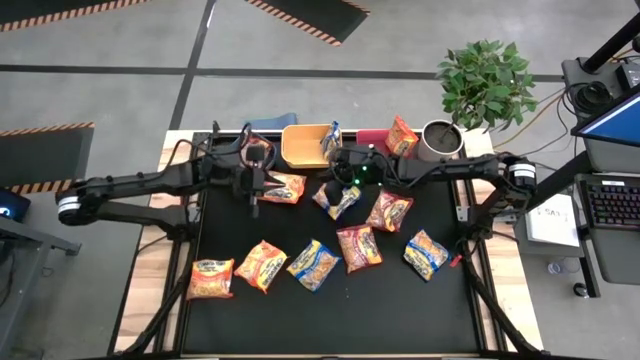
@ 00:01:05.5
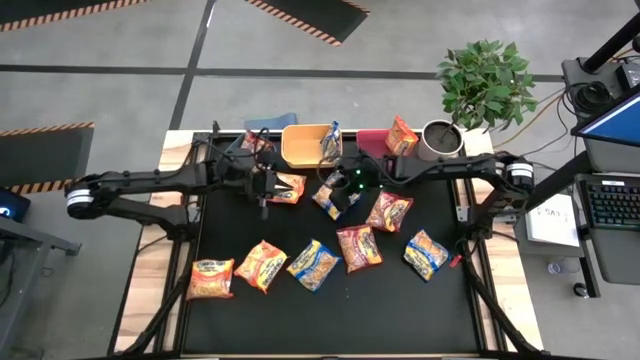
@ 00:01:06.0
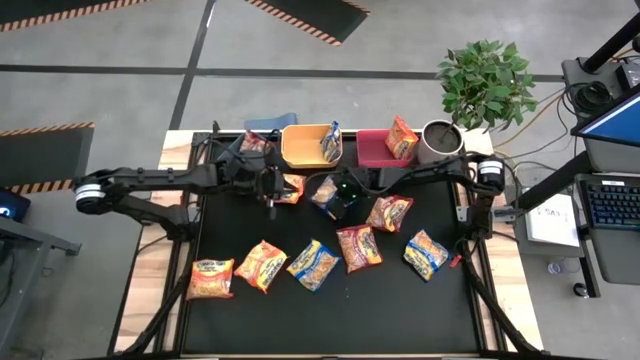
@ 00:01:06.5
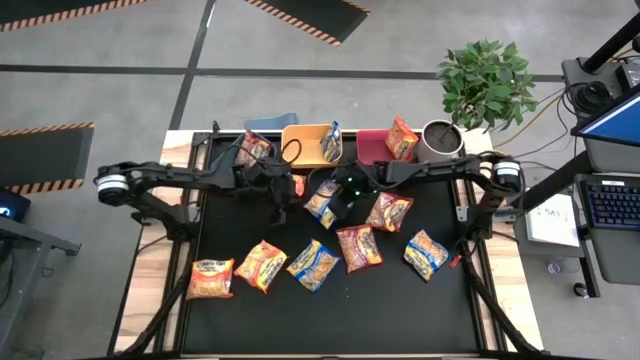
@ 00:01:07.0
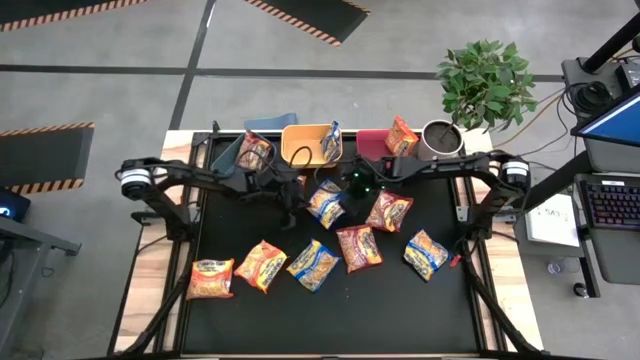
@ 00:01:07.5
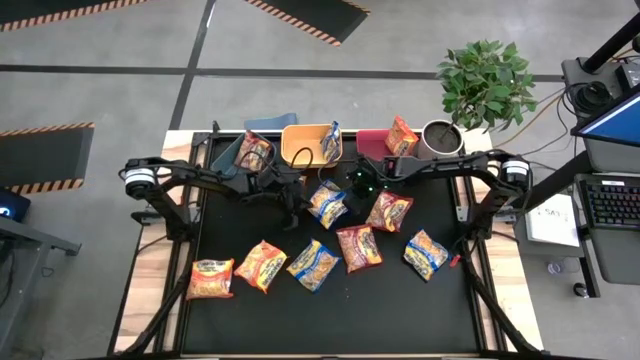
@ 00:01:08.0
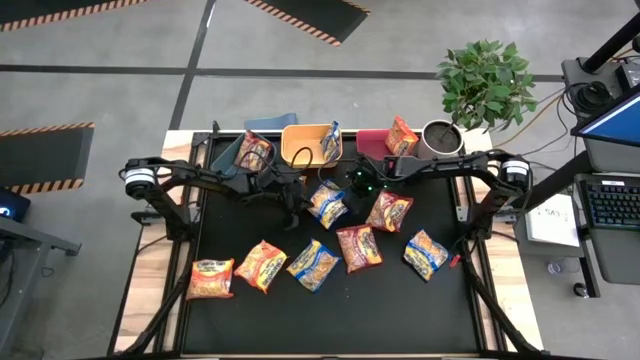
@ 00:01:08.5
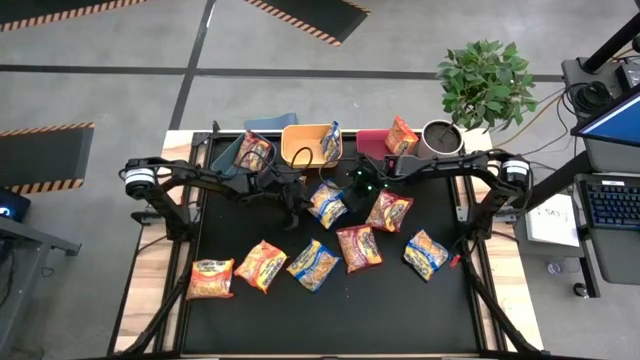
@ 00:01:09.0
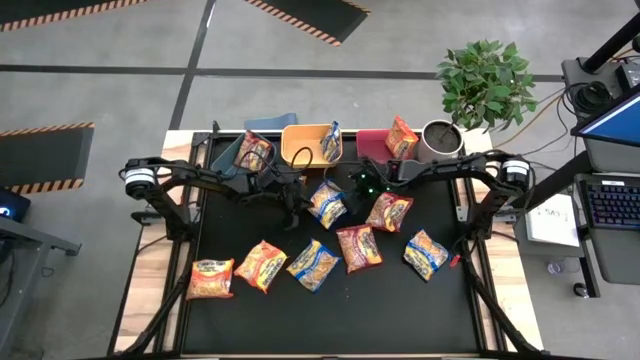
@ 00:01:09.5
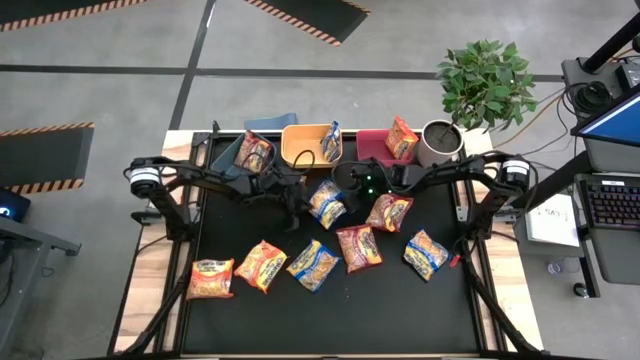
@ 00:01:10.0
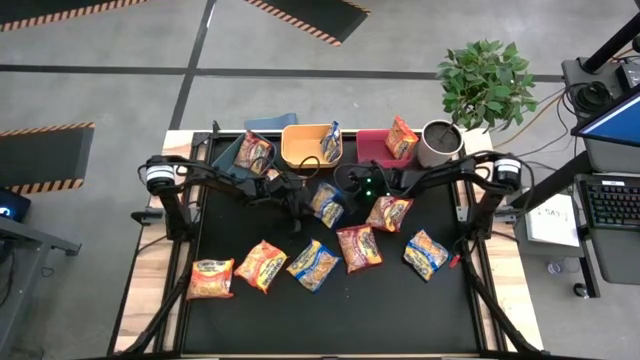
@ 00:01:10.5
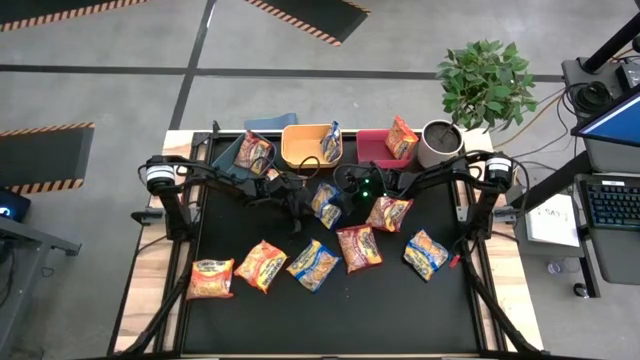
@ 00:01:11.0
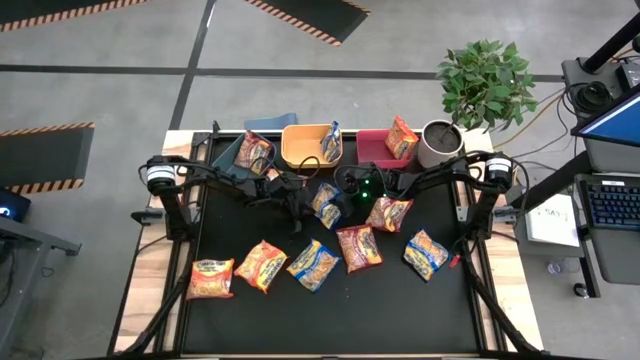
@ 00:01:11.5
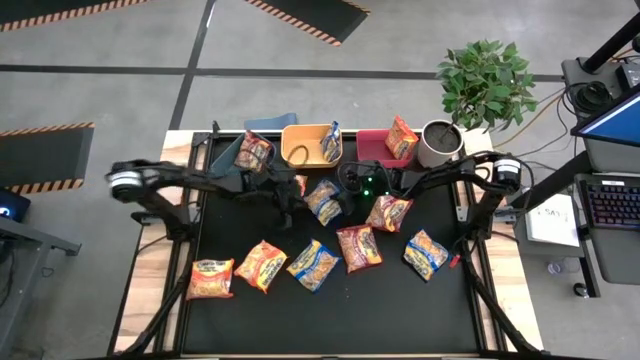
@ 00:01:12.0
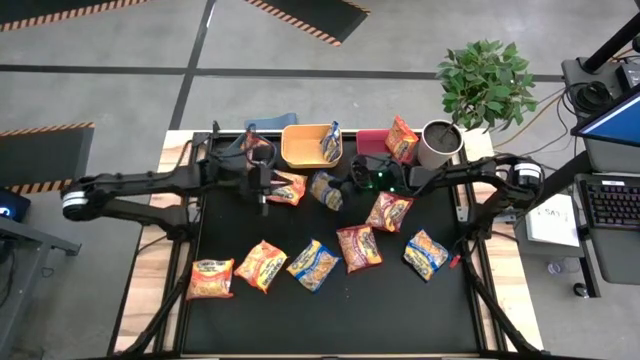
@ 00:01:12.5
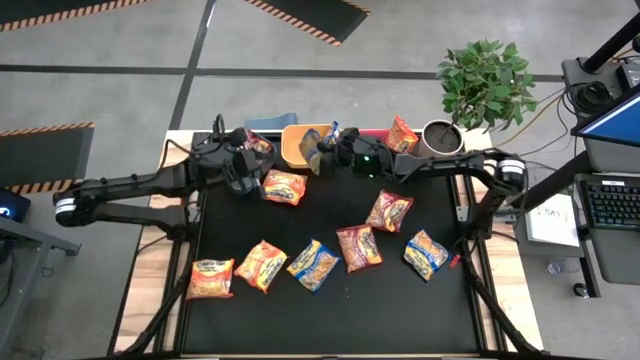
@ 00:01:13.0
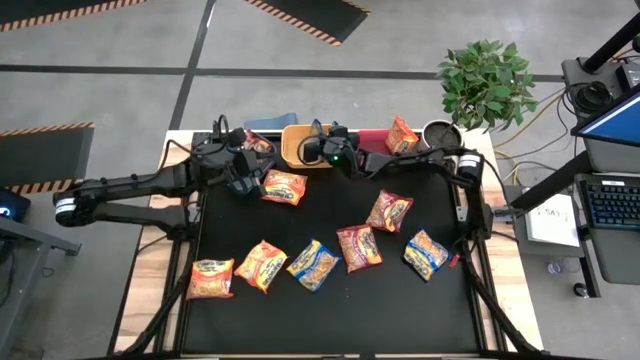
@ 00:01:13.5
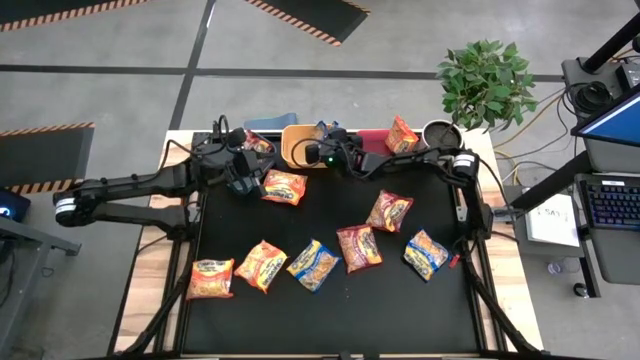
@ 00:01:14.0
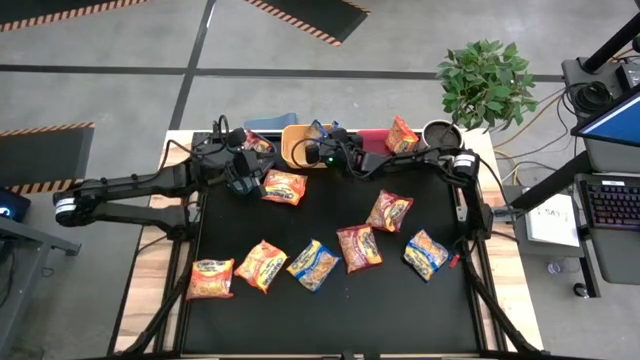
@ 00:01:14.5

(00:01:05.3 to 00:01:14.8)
Task: Sort Maruchan noodles
Put the blue noodle pack into the yellow bin

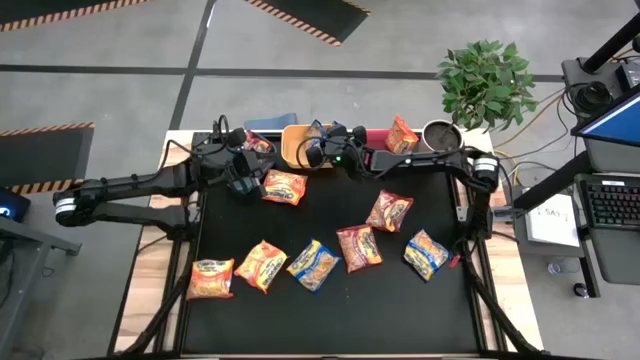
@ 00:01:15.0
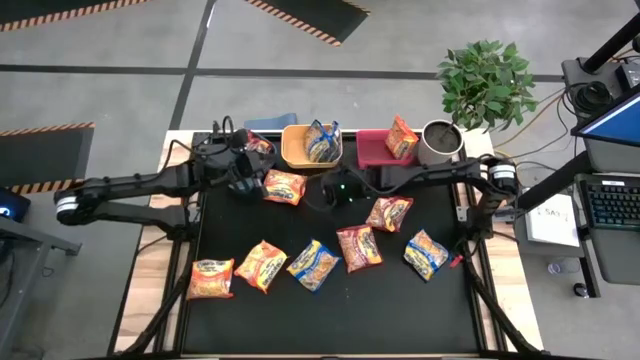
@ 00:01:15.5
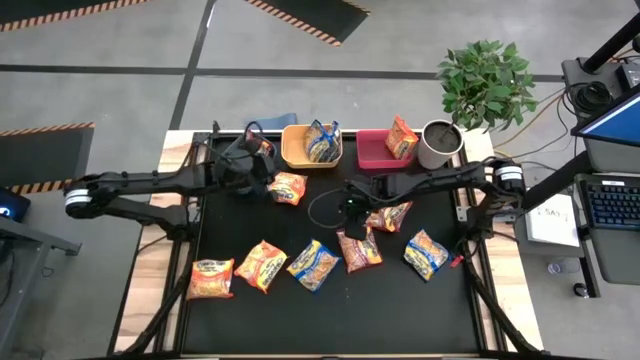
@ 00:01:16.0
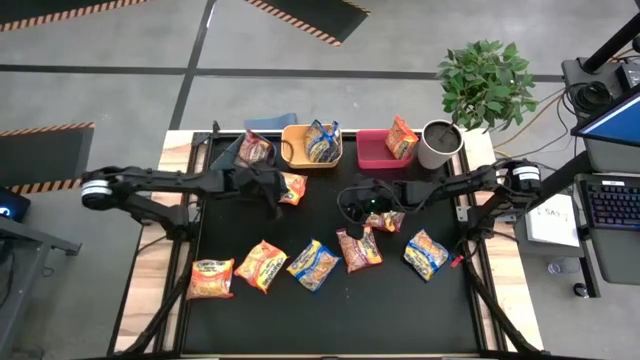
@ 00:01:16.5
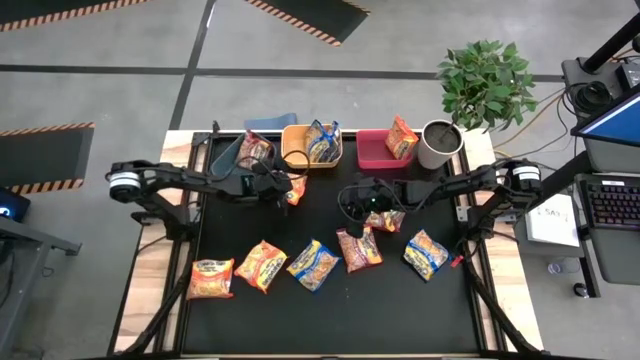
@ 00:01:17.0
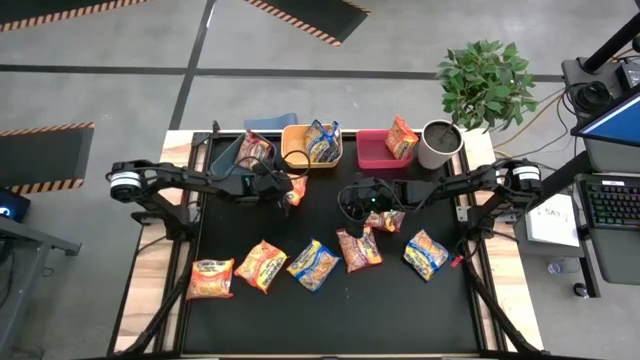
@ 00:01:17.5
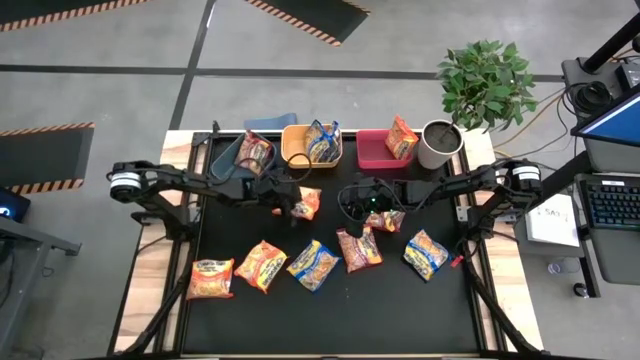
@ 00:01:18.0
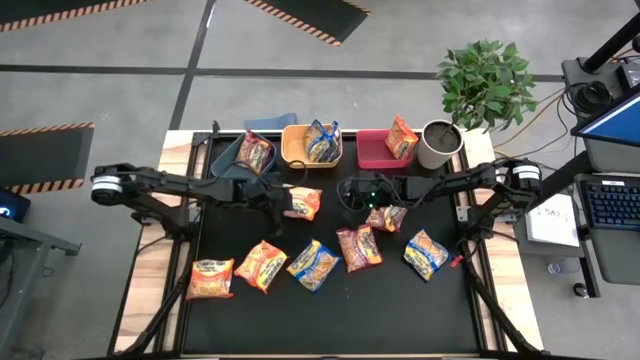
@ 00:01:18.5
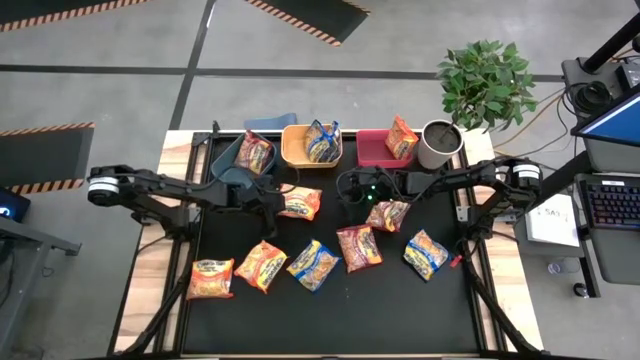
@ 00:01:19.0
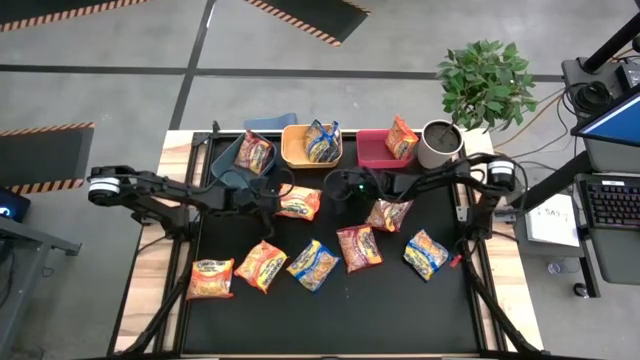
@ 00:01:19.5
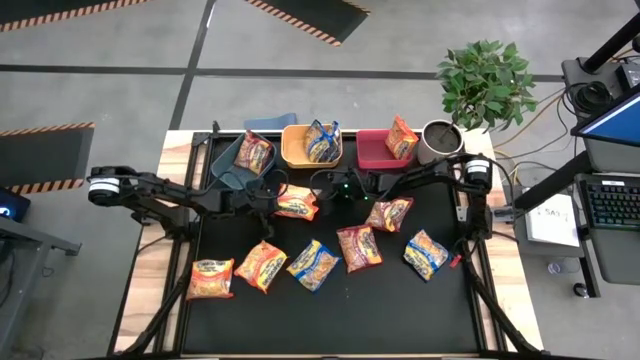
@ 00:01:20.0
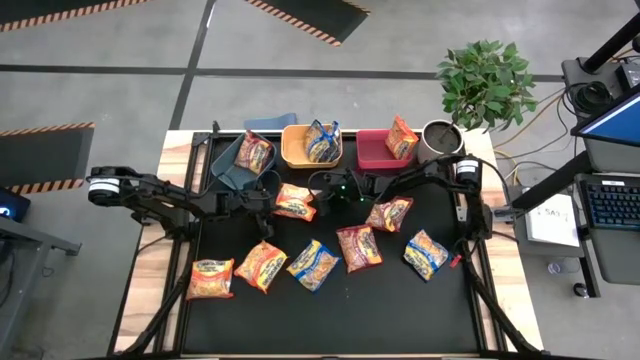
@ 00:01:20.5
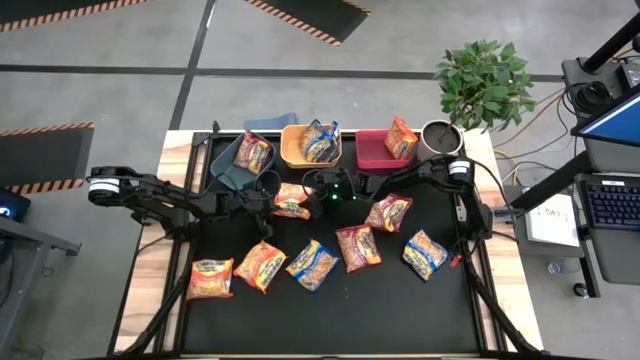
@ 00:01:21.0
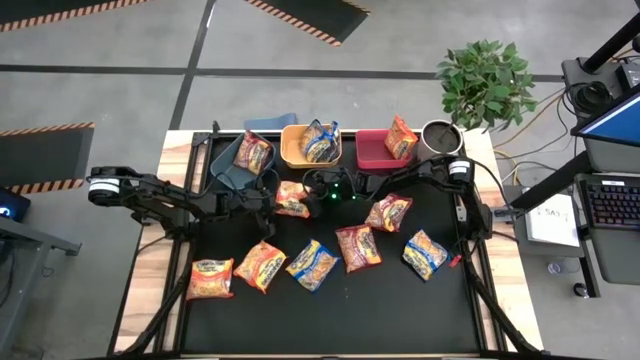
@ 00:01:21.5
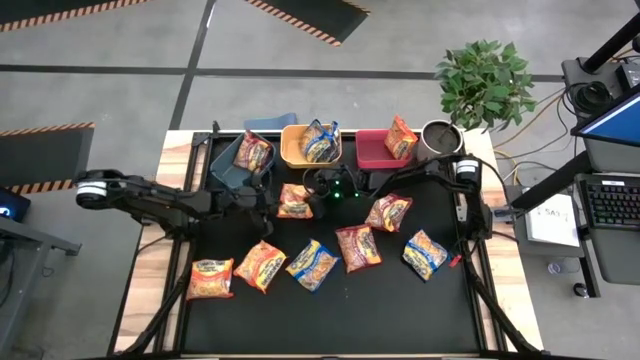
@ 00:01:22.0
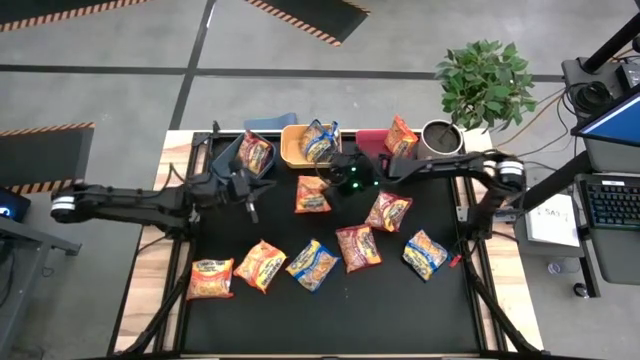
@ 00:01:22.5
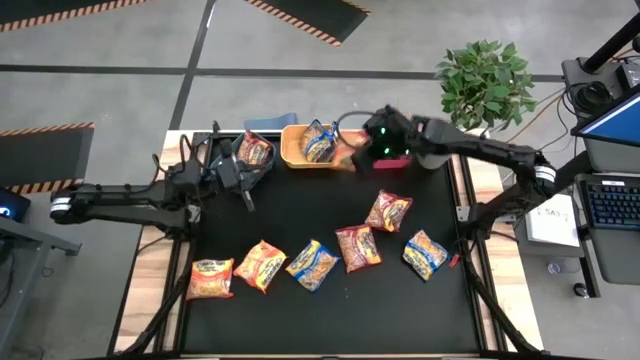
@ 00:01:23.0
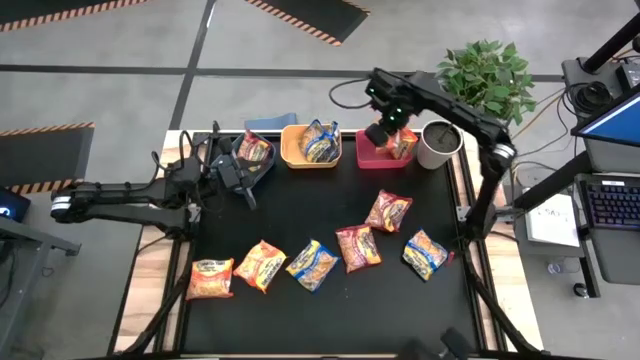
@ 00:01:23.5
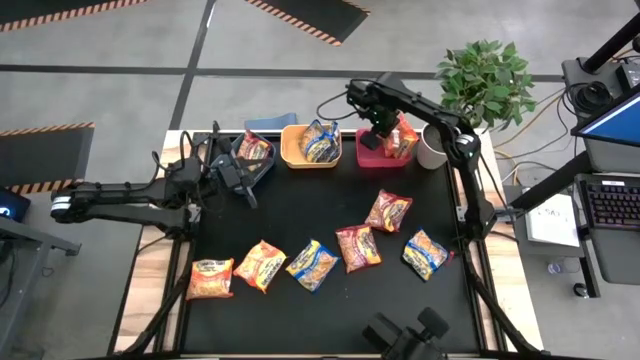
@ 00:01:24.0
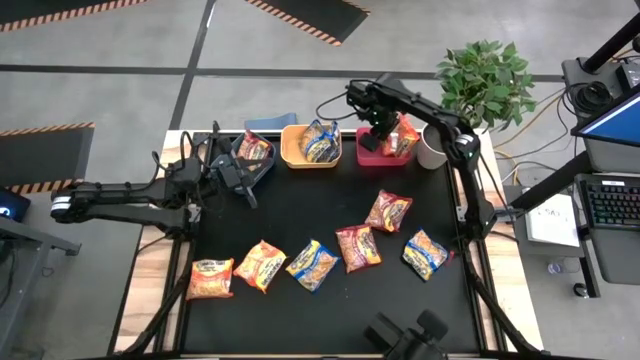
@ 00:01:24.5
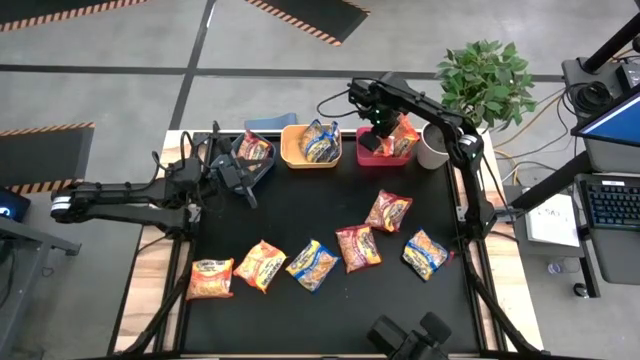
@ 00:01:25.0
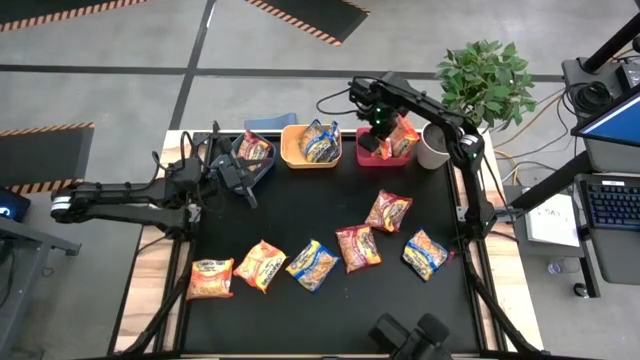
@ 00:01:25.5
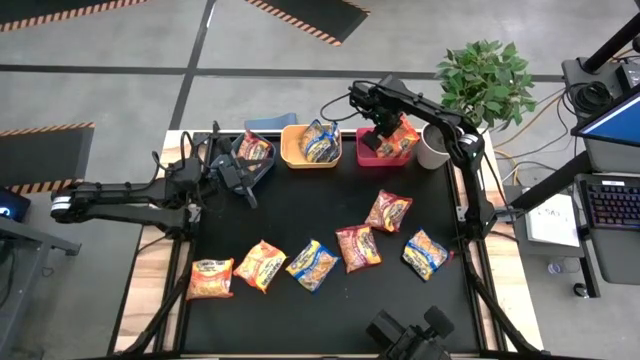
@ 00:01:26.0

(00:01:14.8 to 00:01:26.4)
Put the orange noodle pack into the red bin
